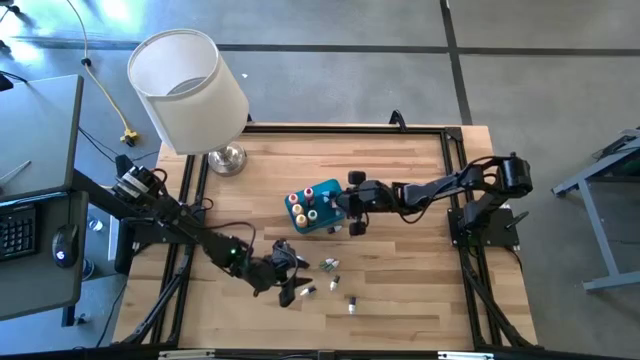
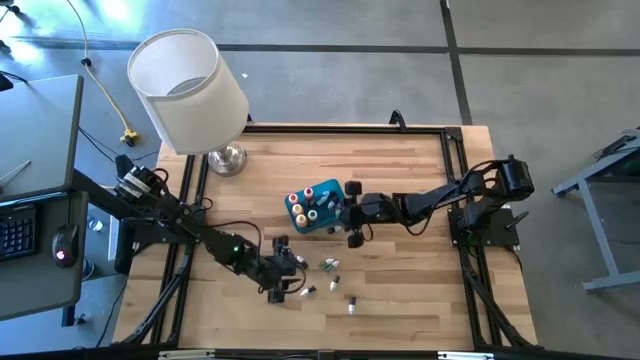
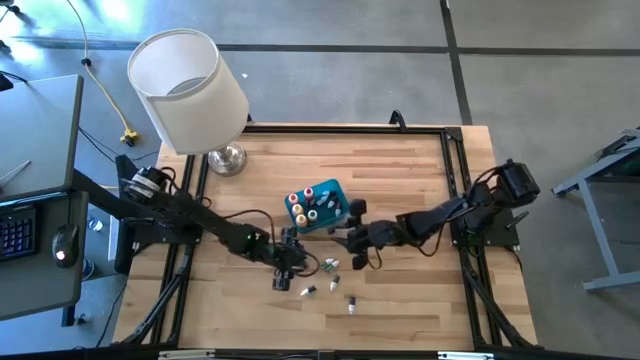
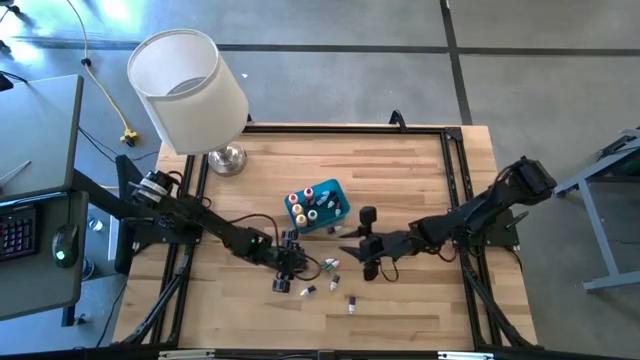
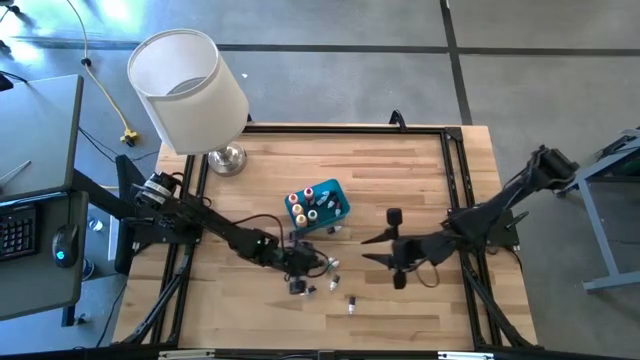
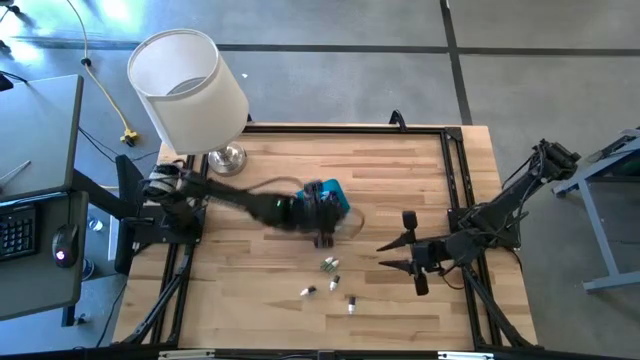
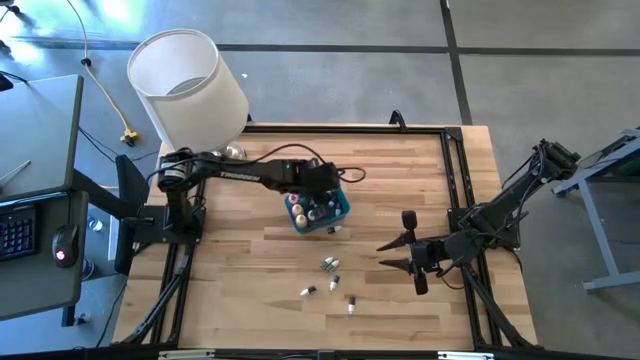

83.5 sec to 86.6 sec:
Task: Pick & Place food coloring
Put the small black food coloring bottle into the bin

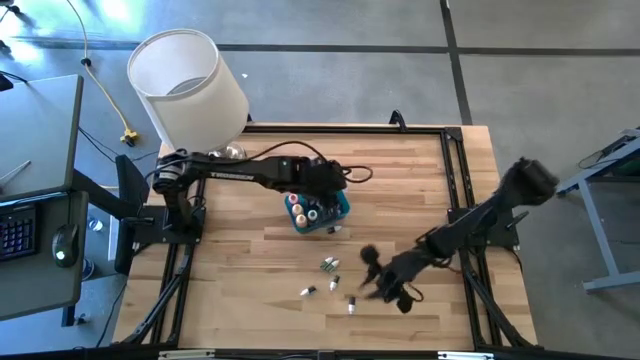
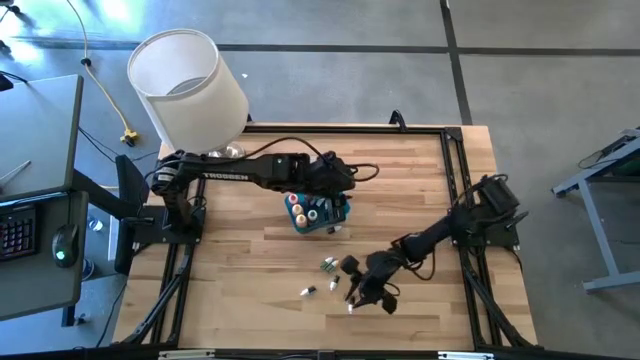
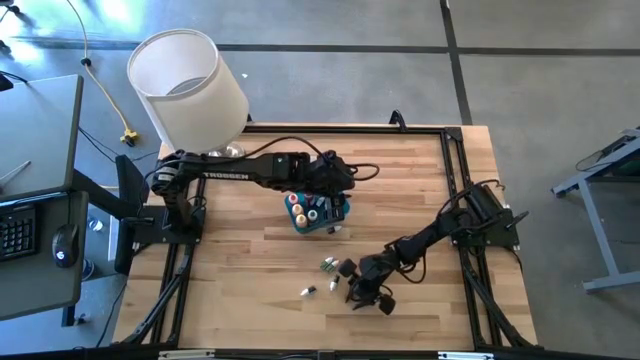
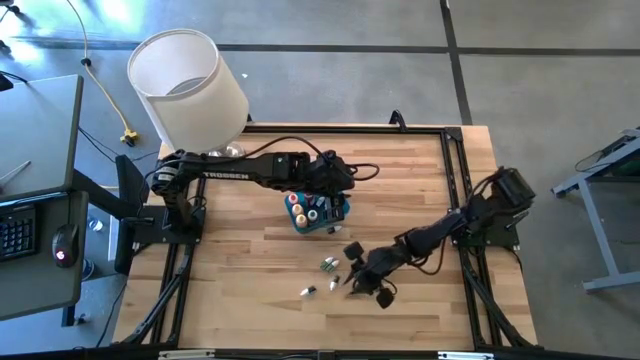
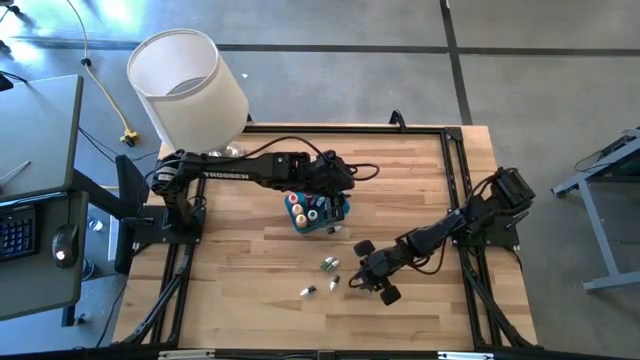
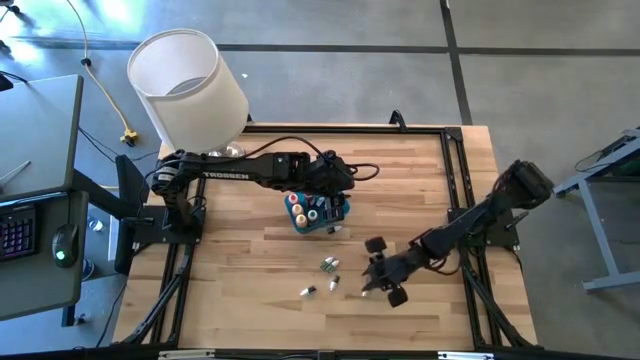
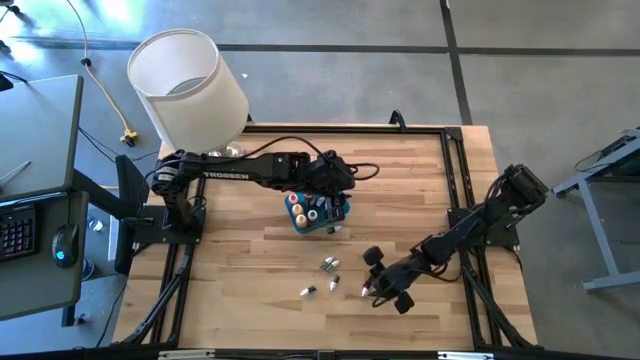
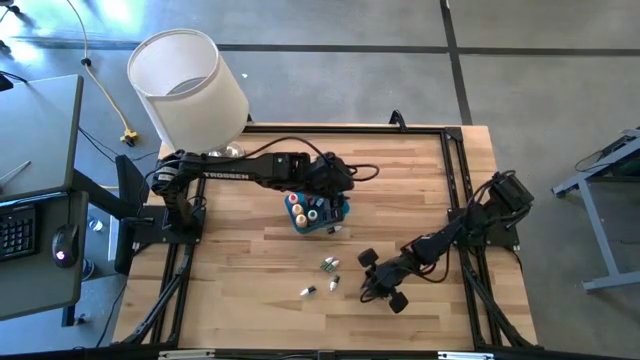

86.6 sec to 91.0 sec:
Put the left small black food coloring bottle into the bin

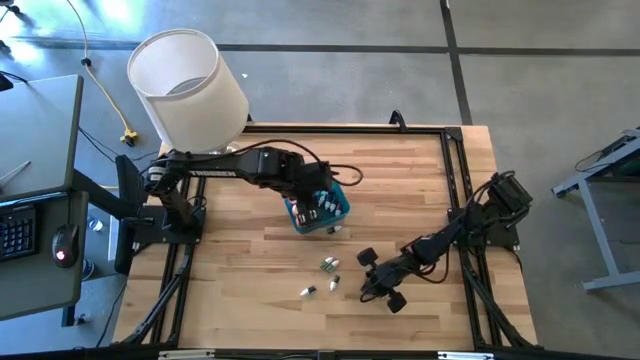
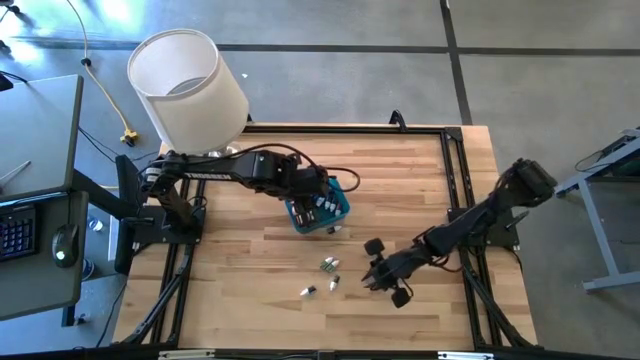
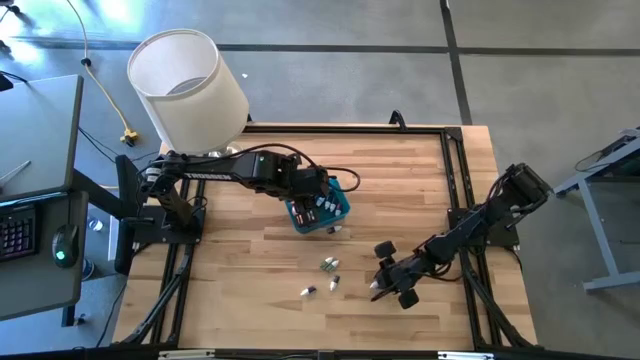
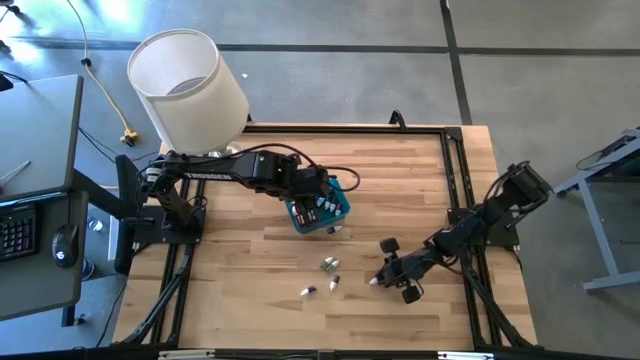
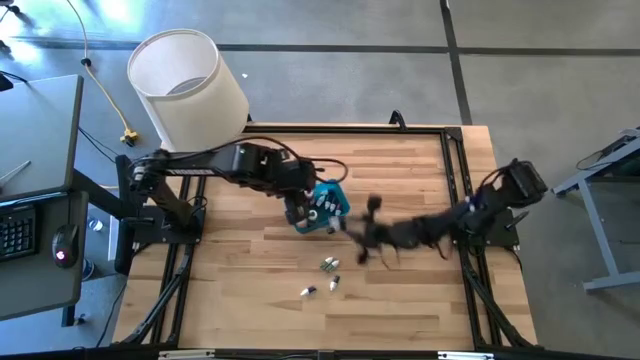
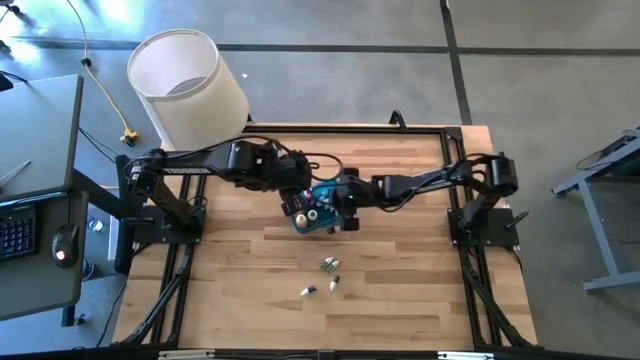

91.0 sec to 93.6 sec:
Put the small black food coloring bottle into the bin

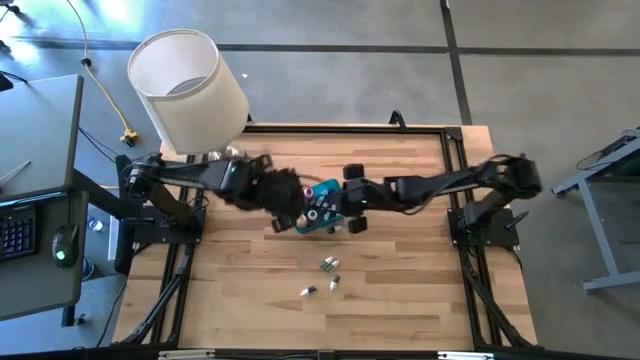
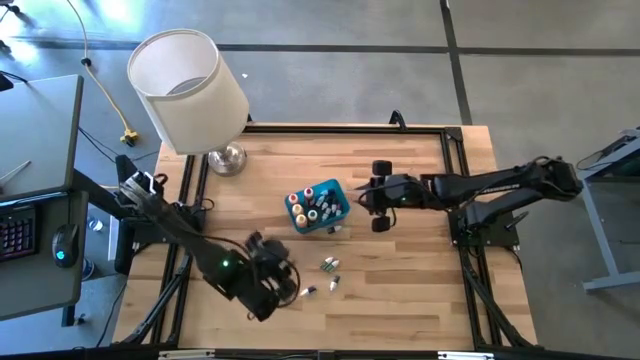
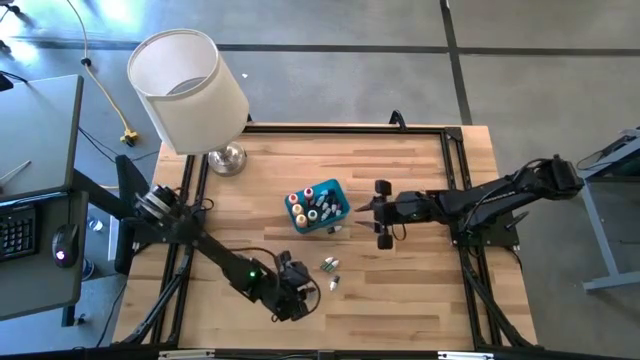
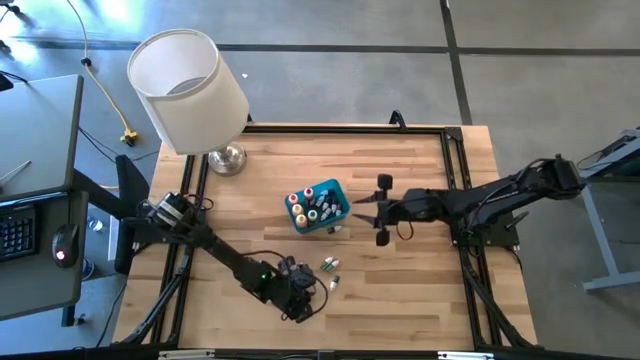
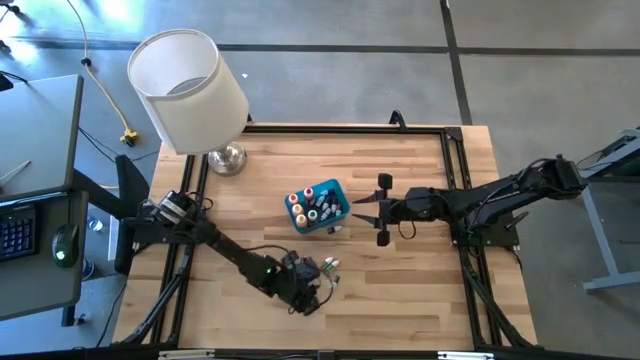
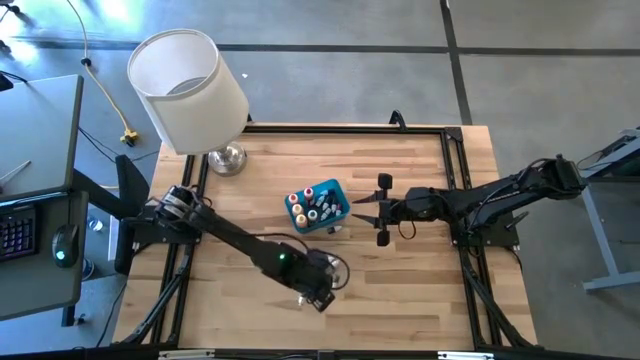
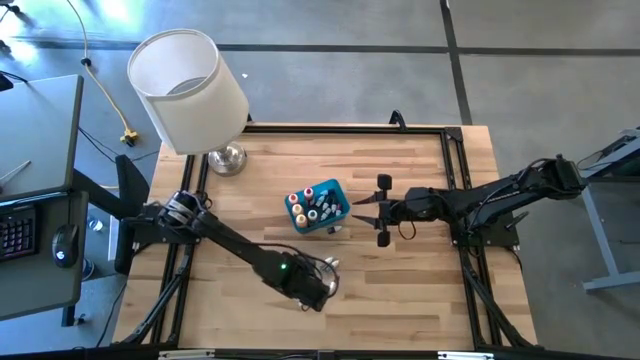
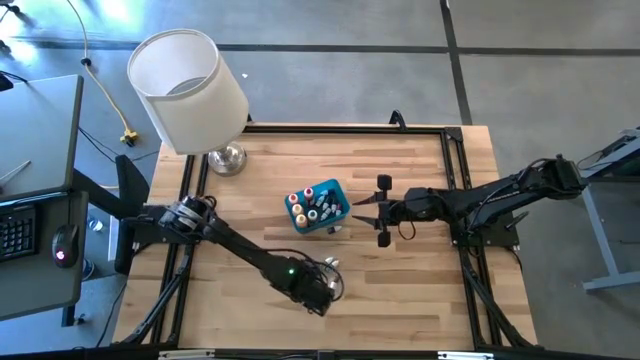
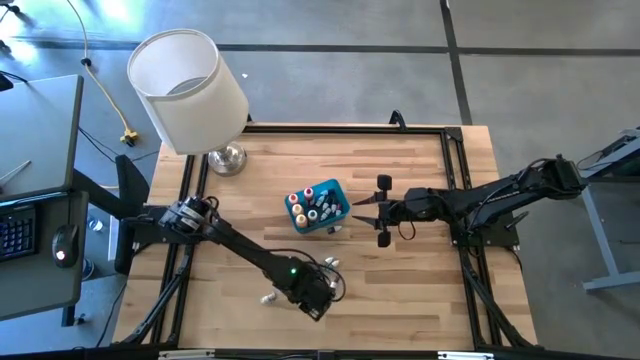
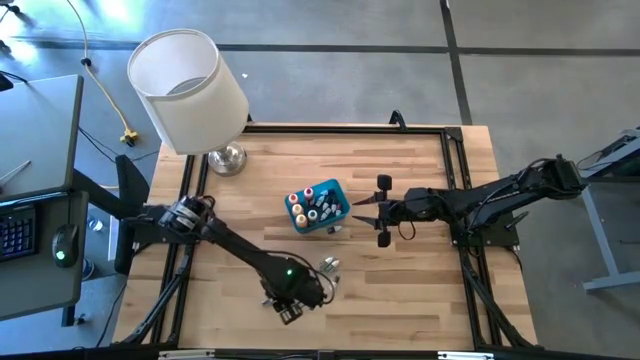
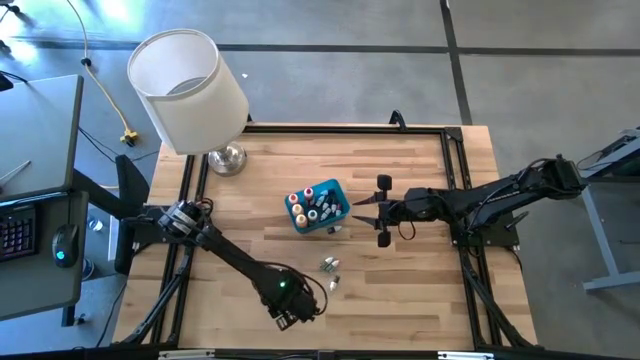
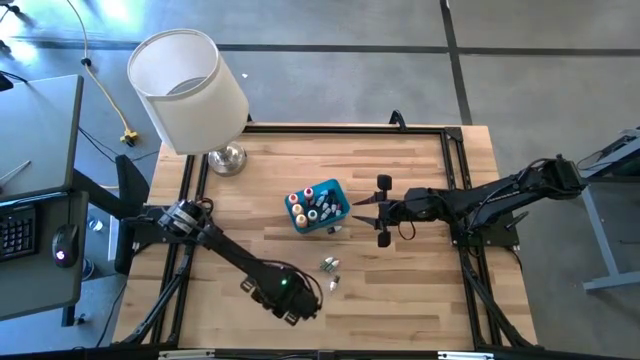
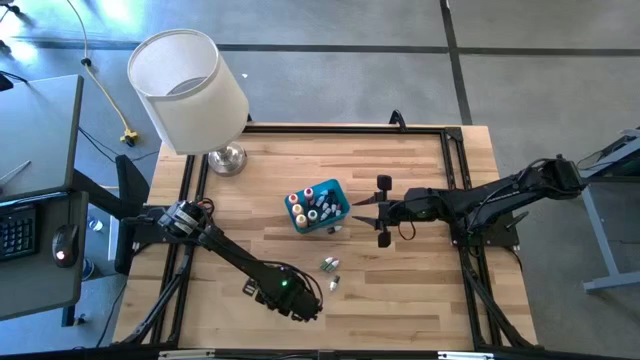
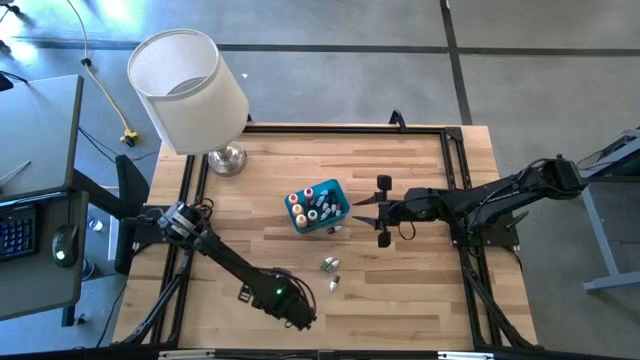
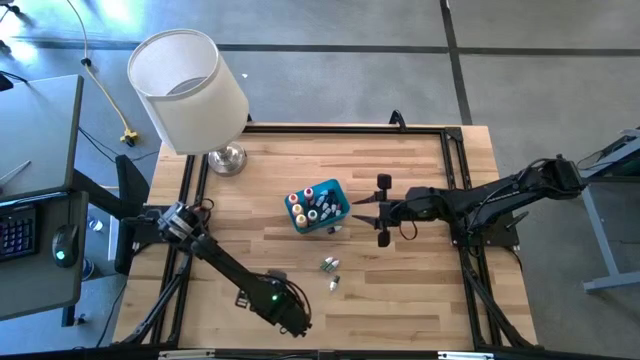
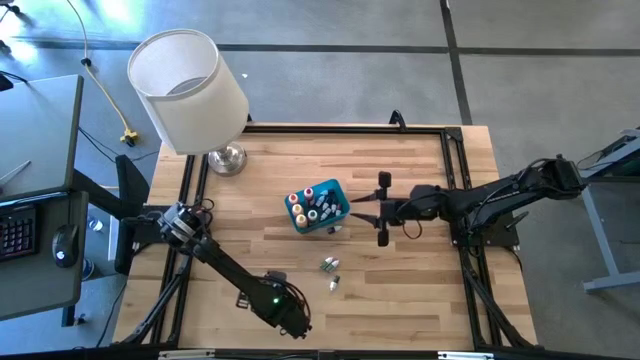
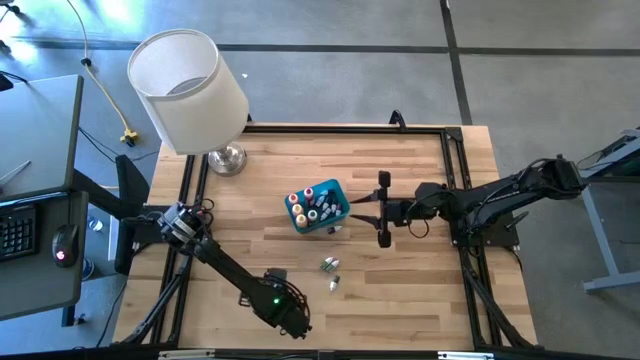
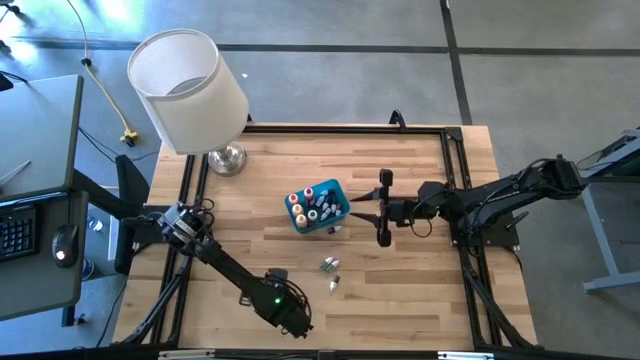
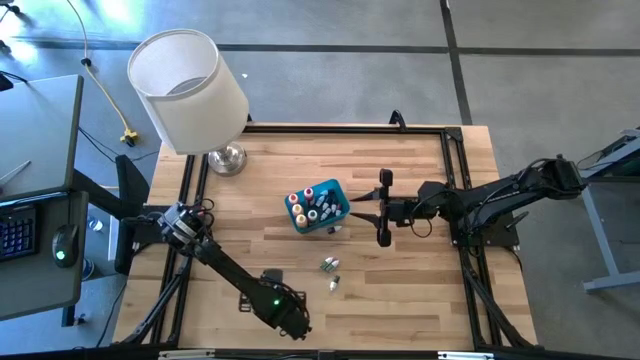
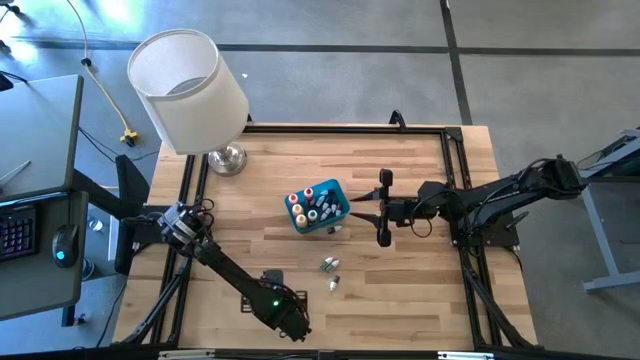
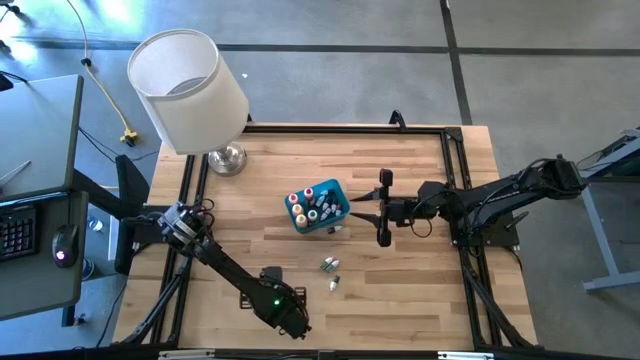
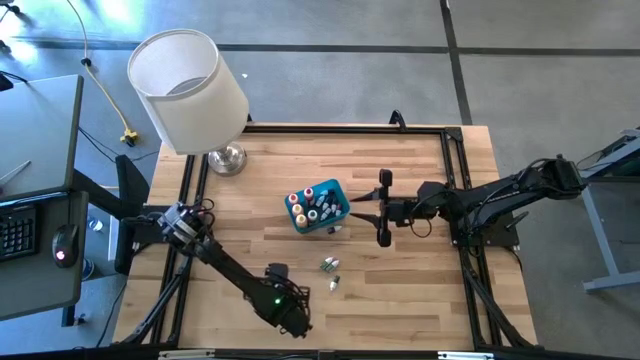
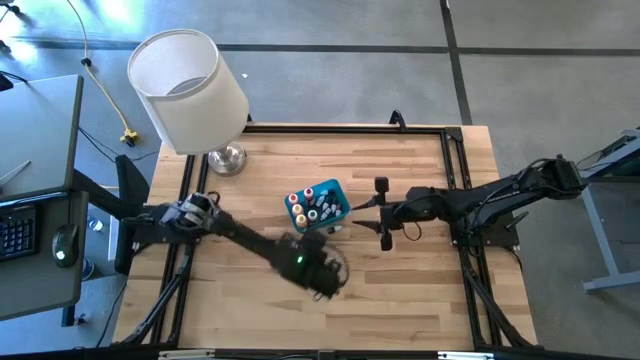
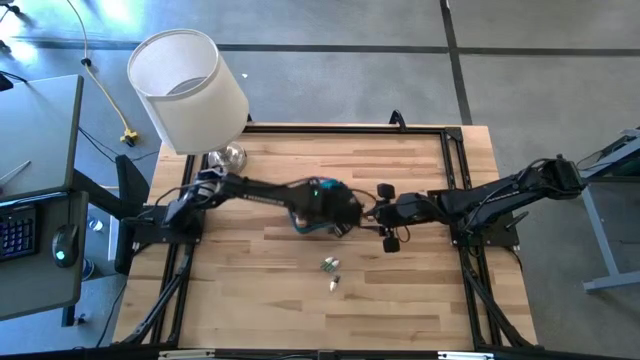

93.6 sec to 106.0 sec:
Put the small blue food coloring bottle into the bin
